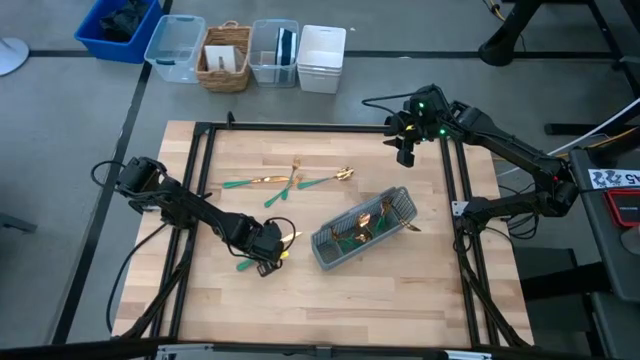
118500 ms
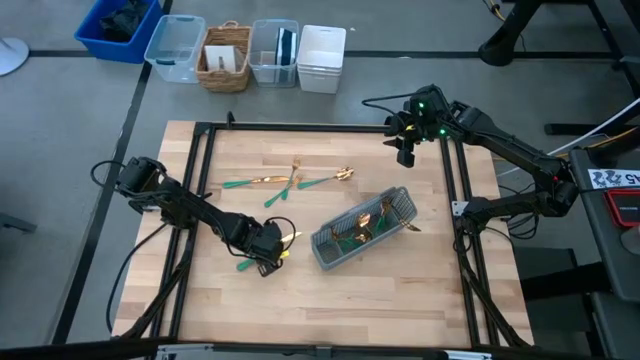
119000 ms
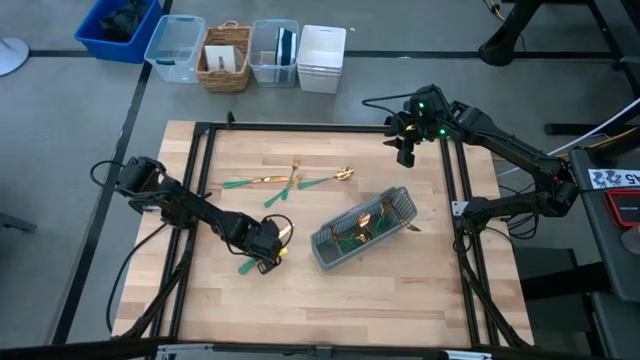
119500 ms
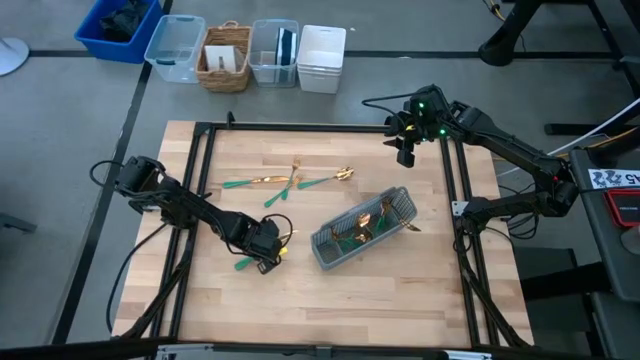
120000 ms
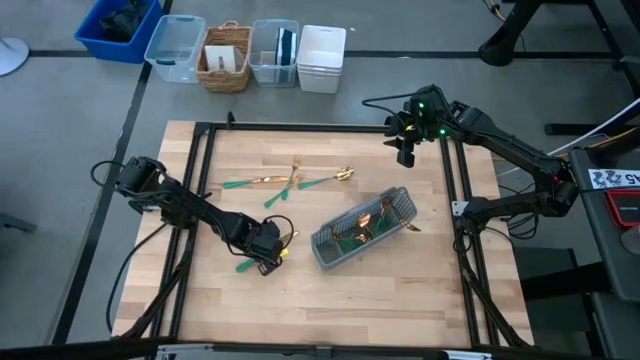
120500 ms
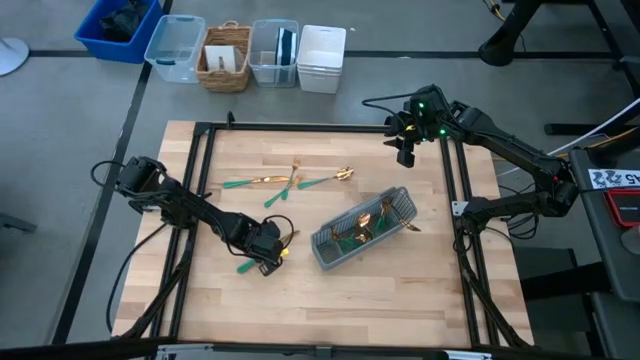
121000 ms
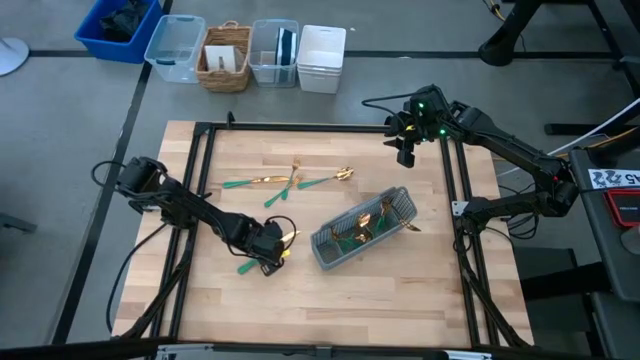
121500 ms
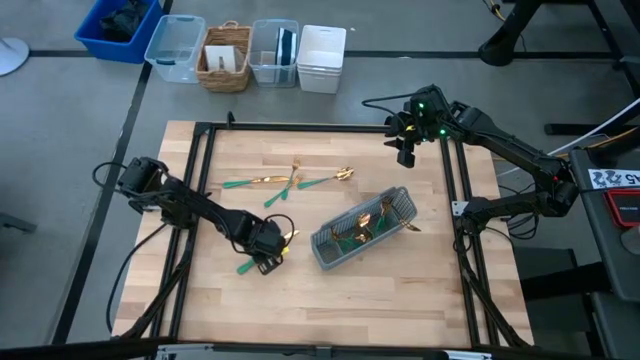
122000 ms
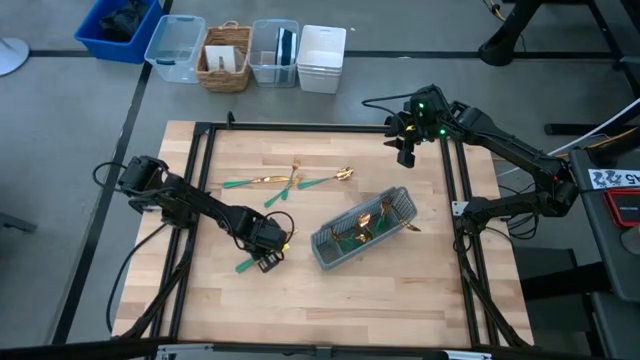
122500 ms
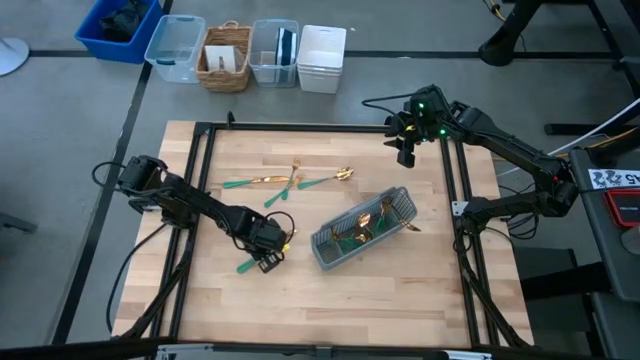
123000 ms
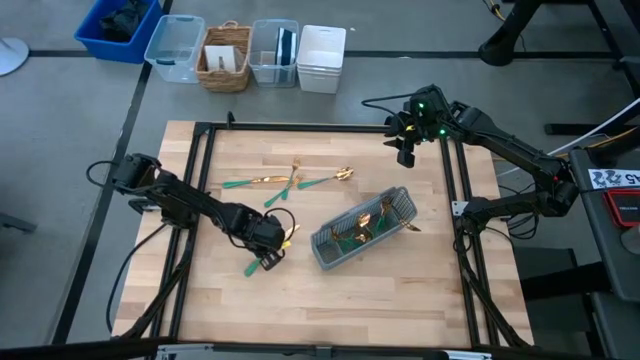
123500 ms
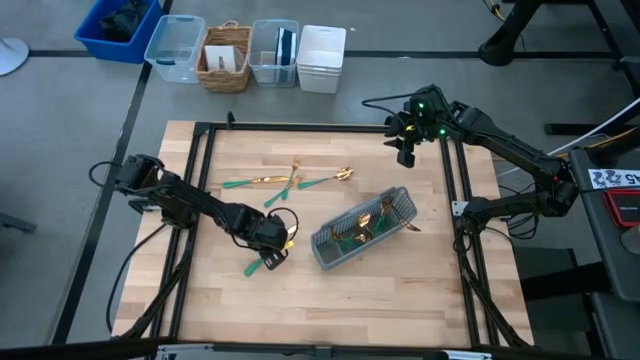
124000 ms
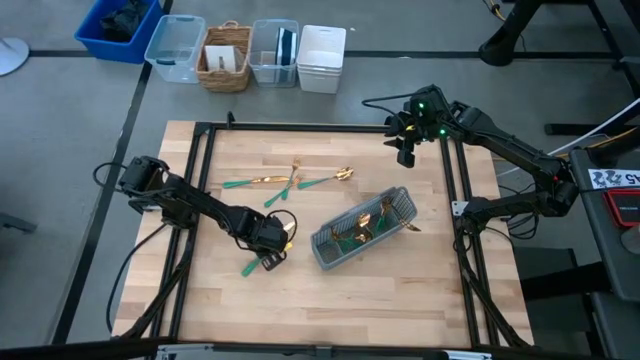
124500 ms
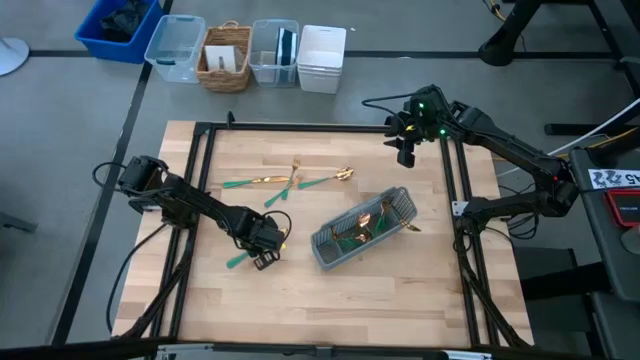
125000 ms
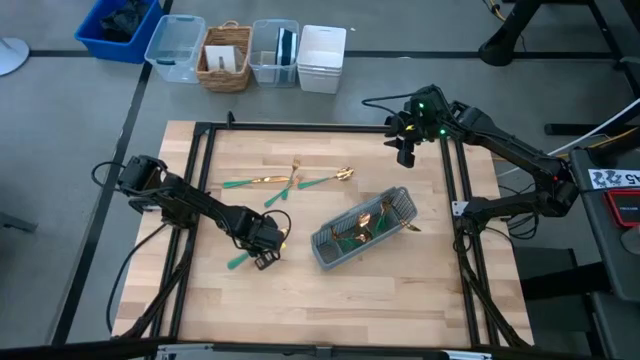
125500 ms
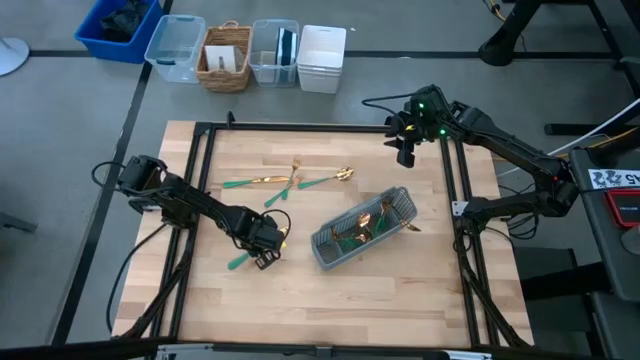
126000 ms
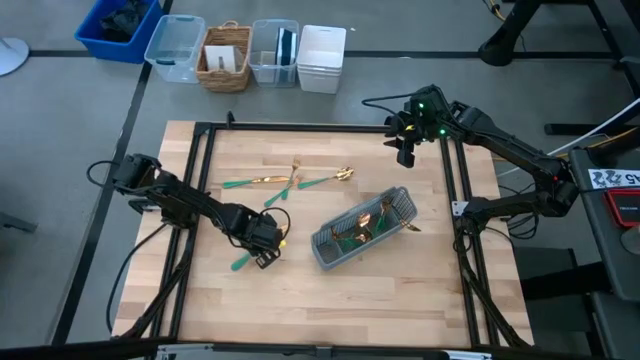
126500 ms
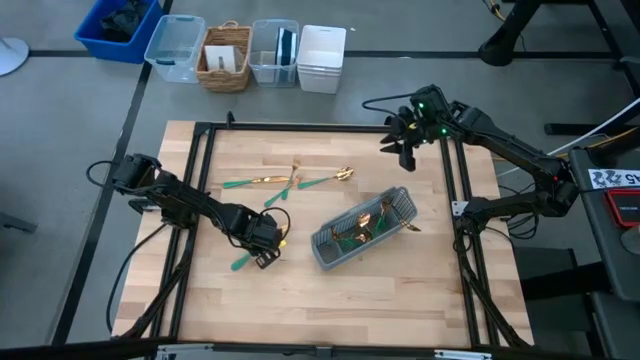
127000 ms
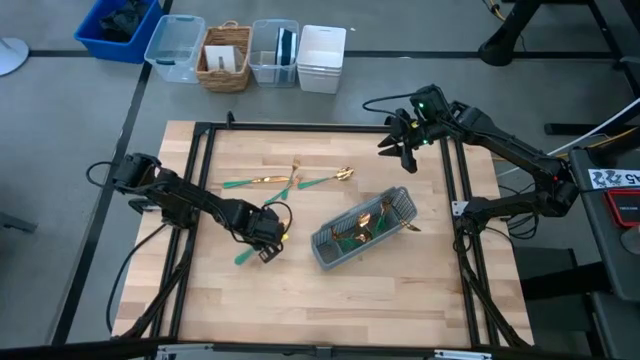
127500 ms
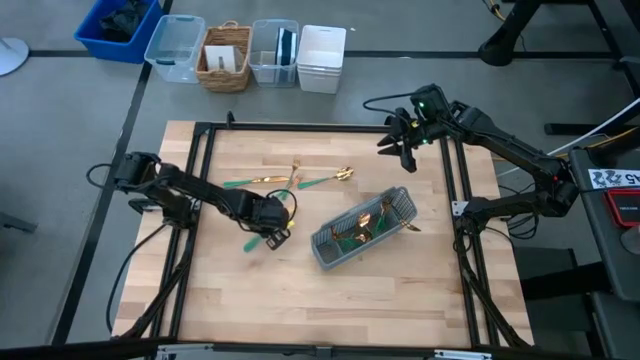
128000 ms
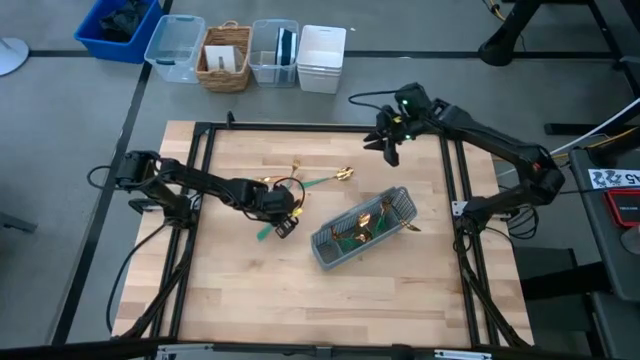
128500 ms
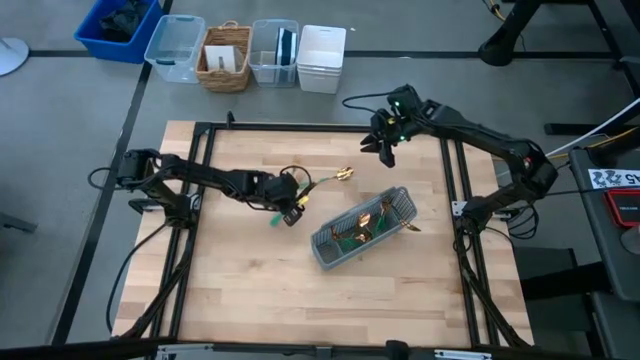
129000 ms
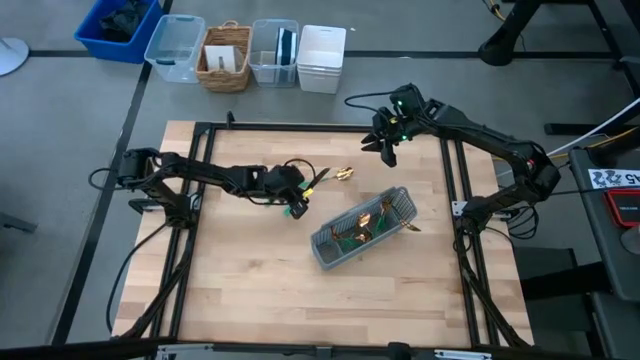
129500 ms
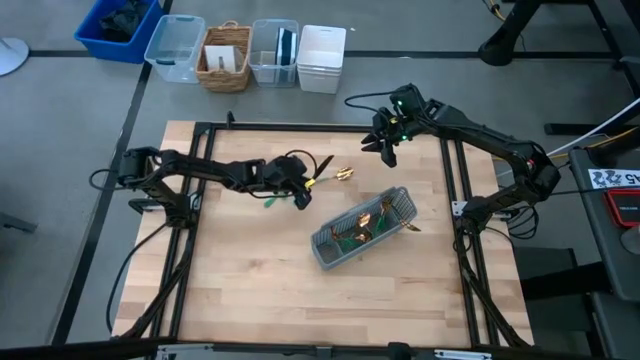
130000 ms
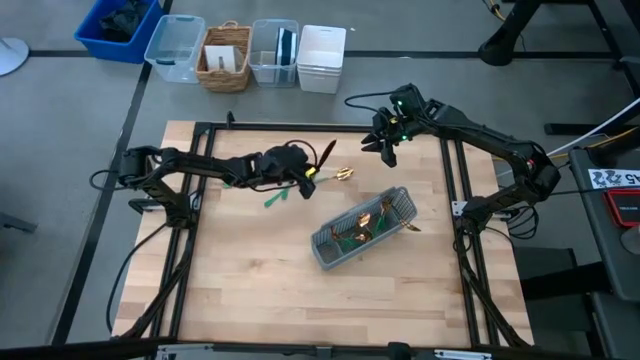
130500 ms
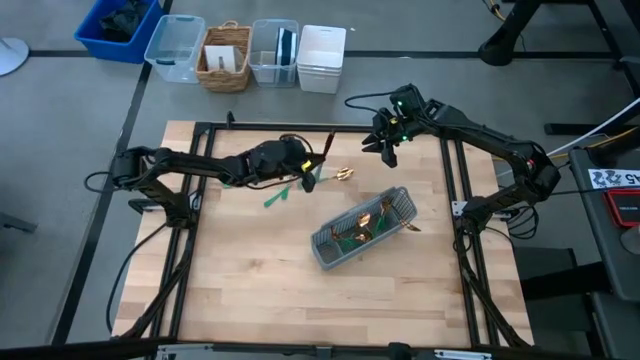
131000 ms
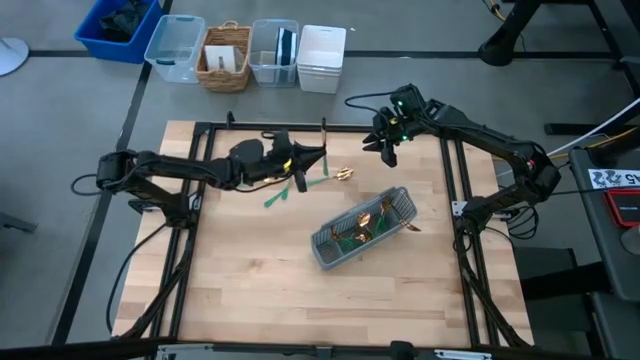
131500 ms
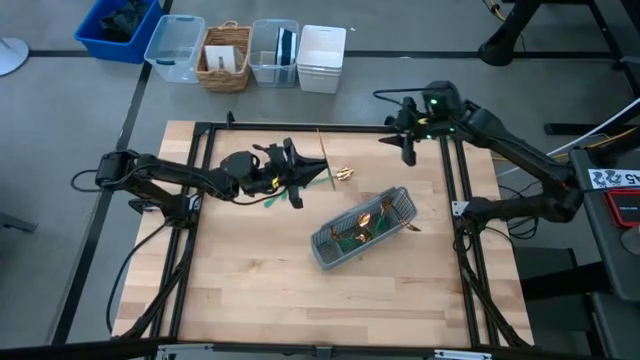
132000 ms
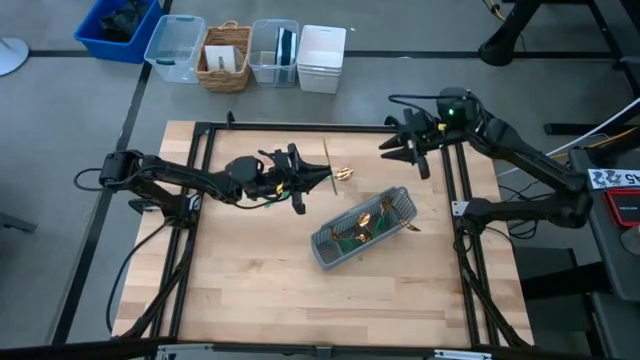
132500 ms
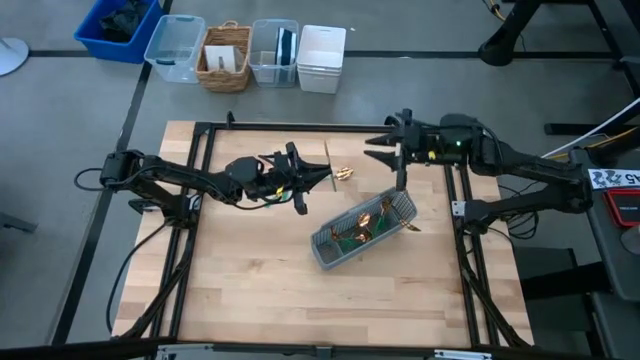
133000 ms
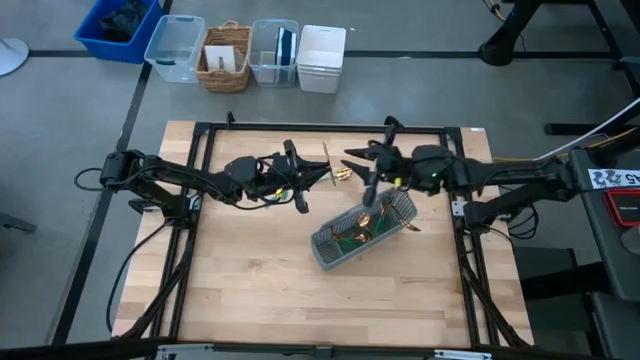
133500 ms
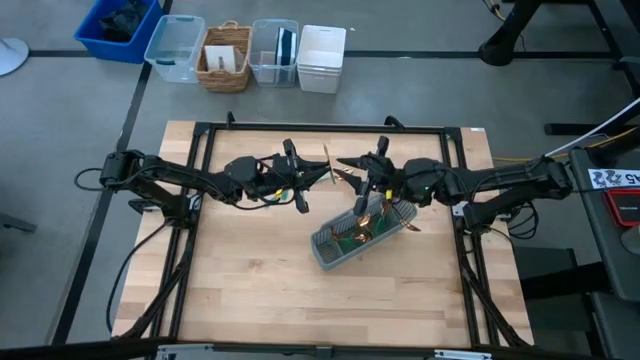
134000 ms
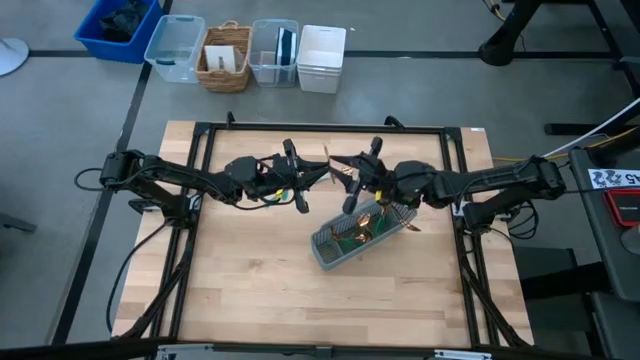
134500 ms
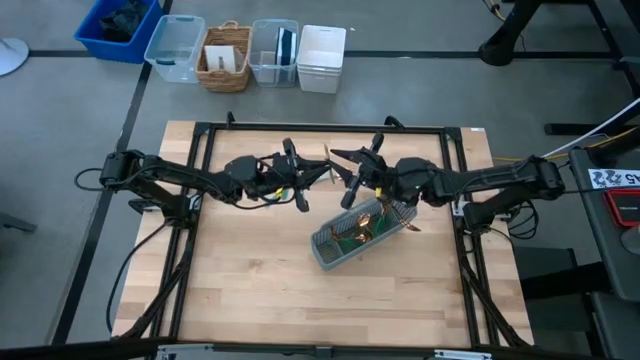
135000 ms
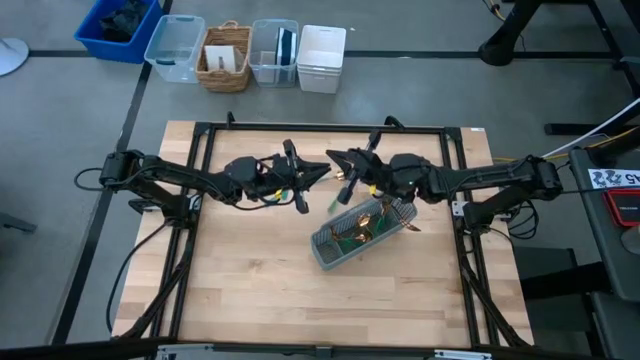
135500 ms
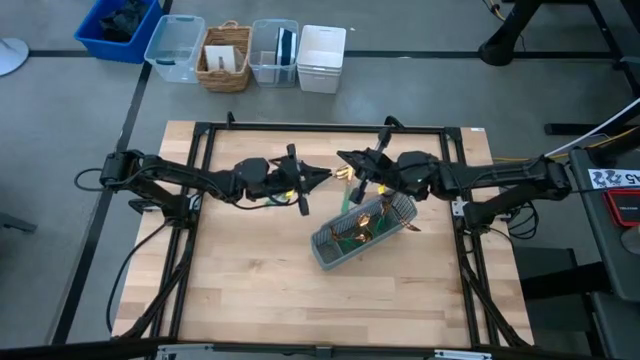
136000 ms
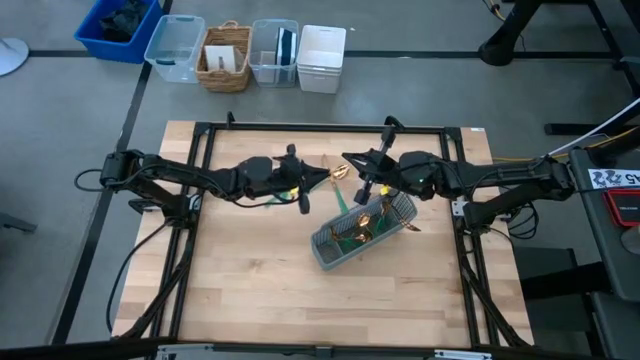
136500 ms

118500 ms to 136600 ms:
Task: Sort silverware
Put the gold knife into the gray silverware organizer

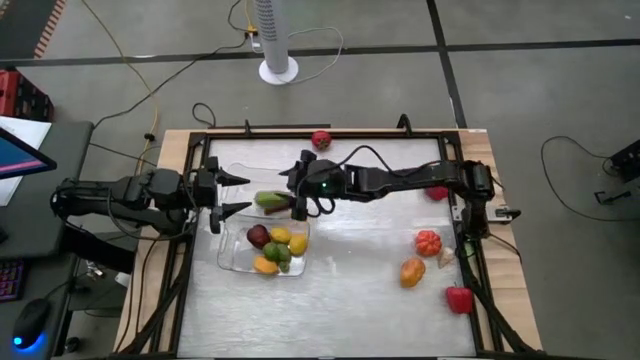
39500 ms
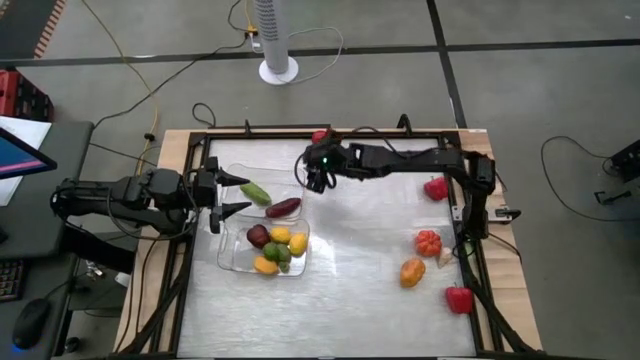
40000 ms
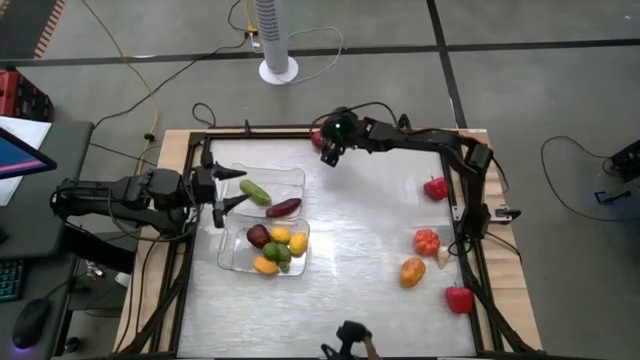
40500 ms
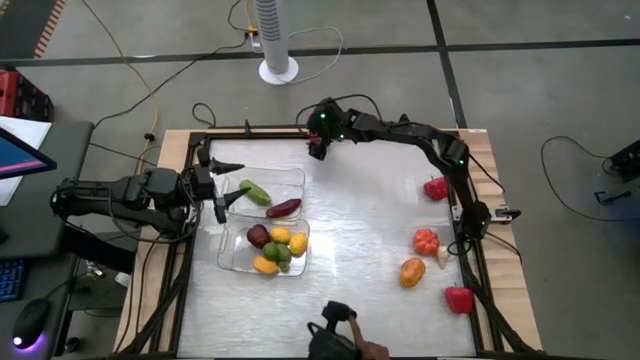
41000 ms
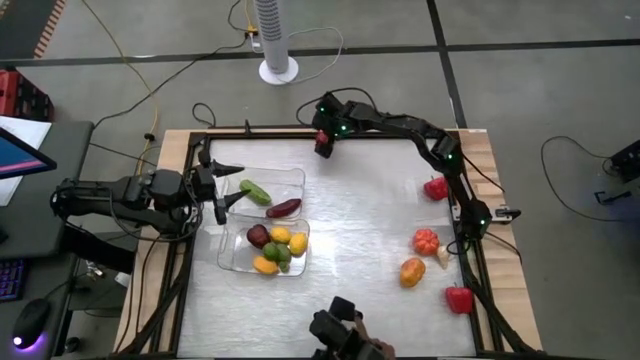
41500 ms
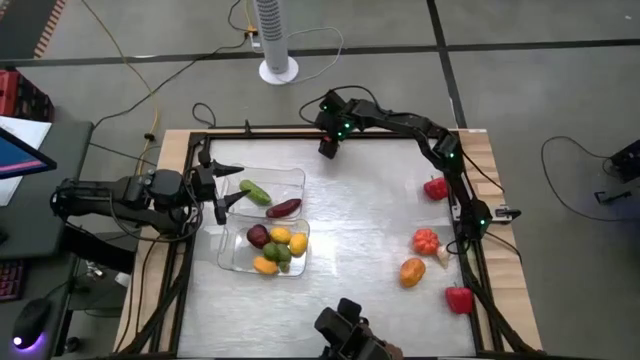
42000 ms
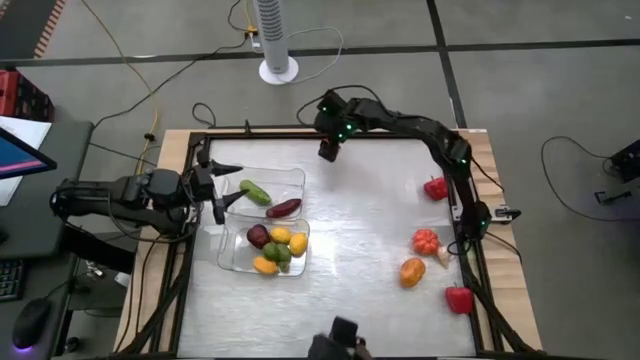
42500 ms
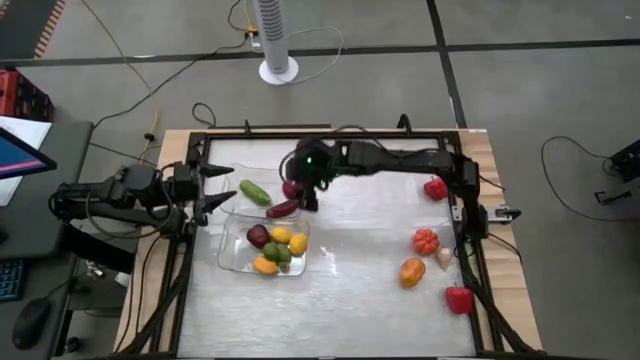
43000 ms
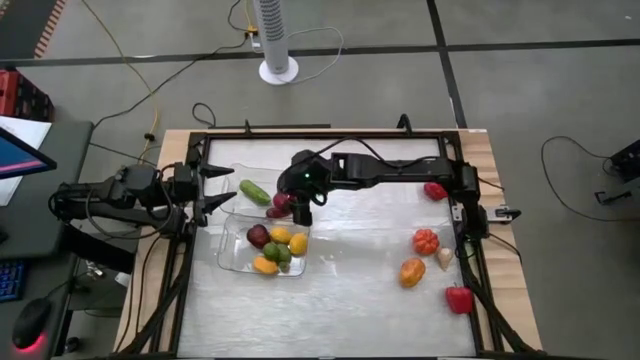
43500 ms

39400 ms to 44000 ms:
Task: Sort produce into baskets
Put the red tomato into the bottom transparent bin
